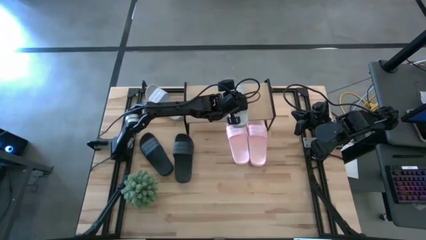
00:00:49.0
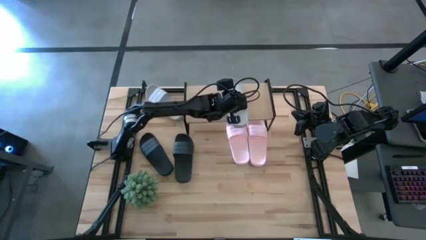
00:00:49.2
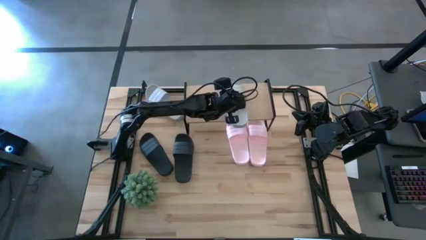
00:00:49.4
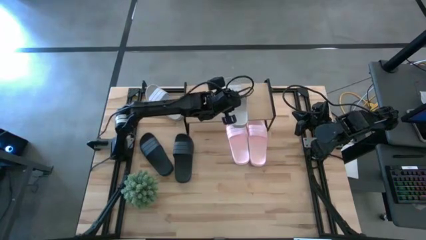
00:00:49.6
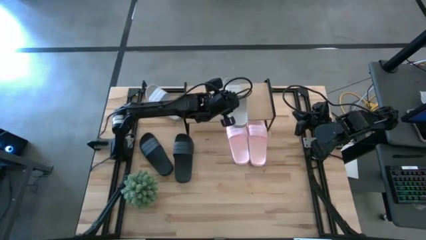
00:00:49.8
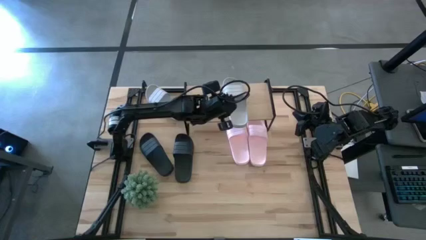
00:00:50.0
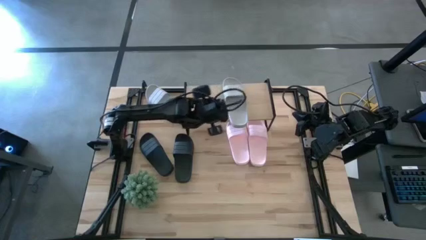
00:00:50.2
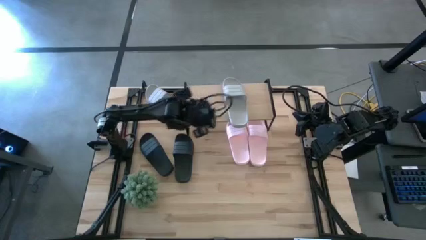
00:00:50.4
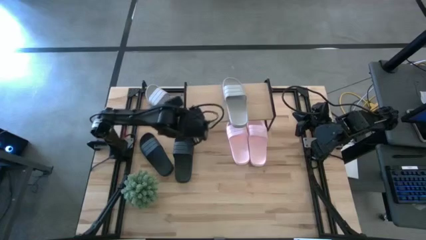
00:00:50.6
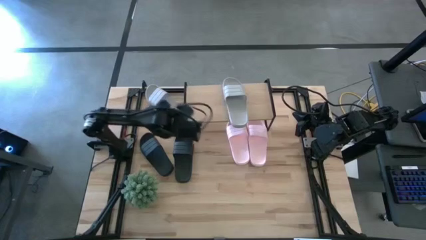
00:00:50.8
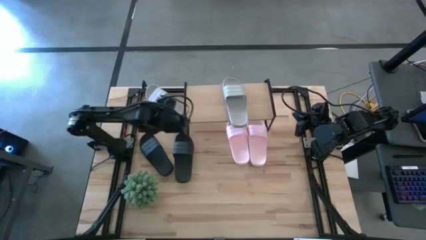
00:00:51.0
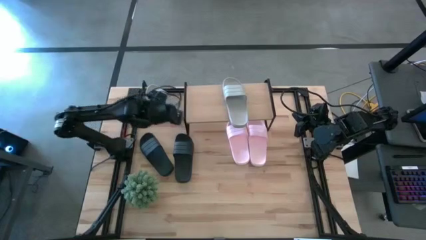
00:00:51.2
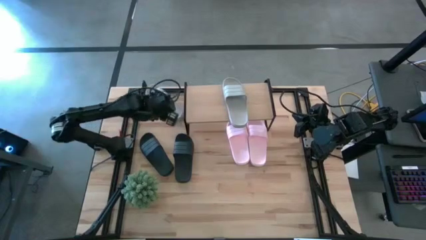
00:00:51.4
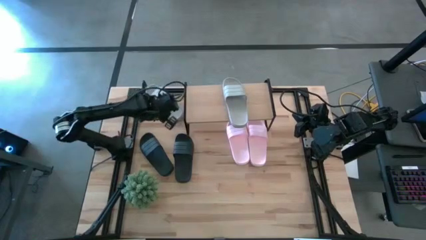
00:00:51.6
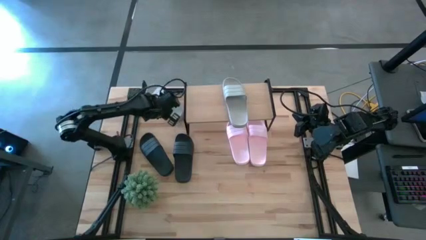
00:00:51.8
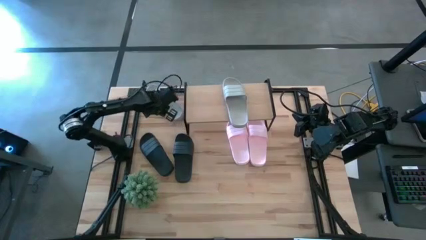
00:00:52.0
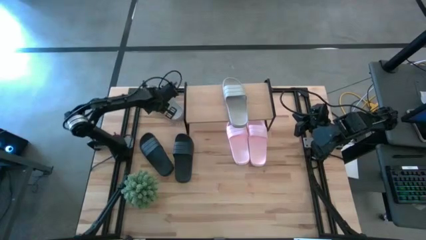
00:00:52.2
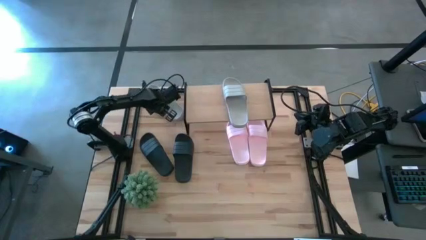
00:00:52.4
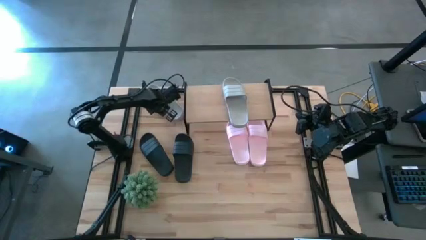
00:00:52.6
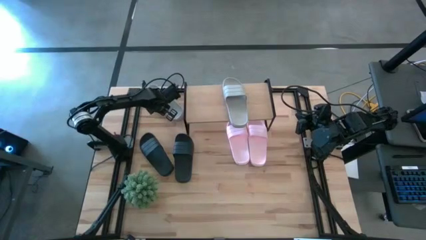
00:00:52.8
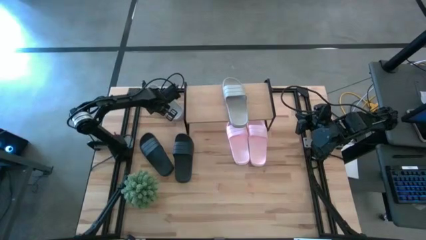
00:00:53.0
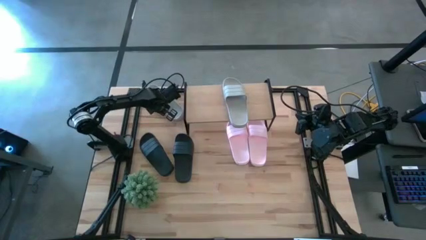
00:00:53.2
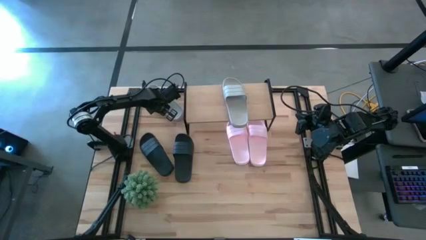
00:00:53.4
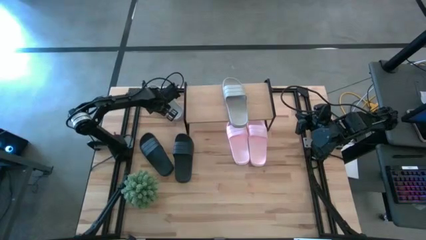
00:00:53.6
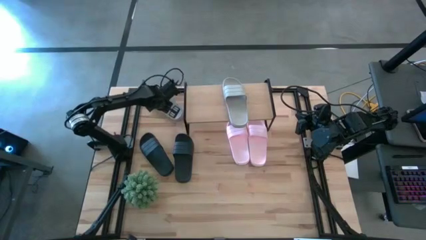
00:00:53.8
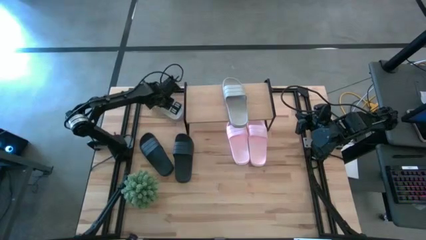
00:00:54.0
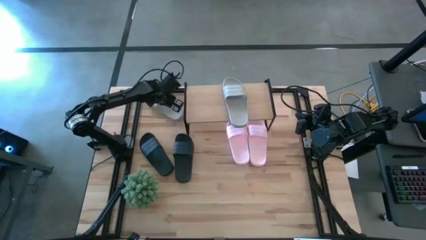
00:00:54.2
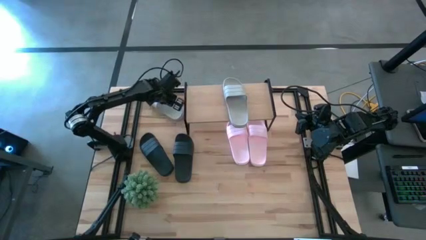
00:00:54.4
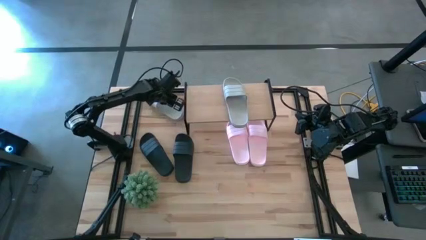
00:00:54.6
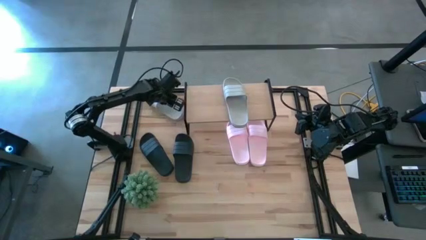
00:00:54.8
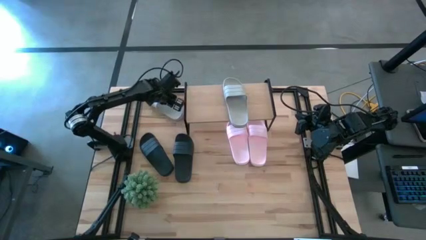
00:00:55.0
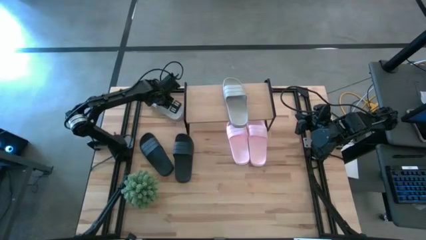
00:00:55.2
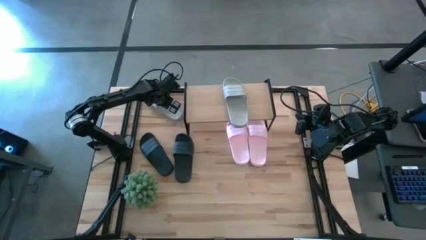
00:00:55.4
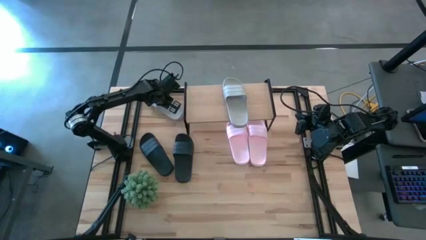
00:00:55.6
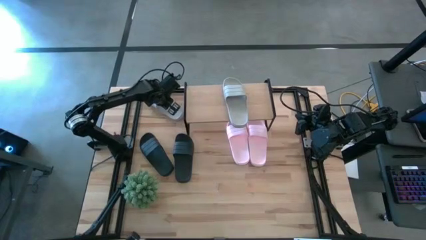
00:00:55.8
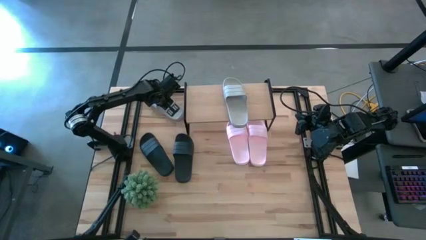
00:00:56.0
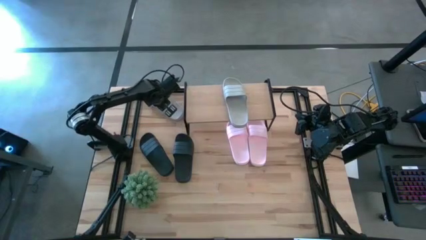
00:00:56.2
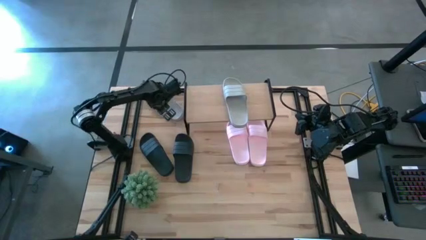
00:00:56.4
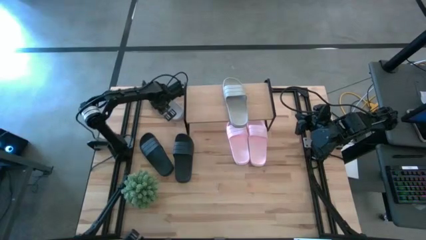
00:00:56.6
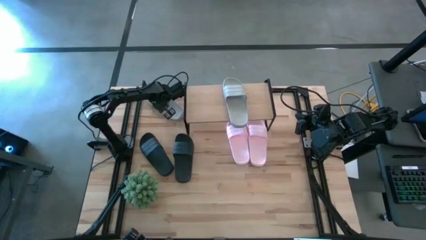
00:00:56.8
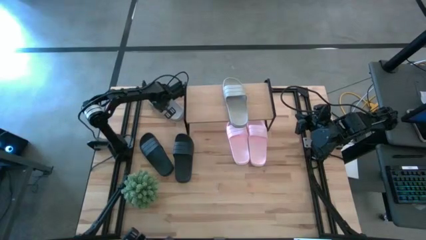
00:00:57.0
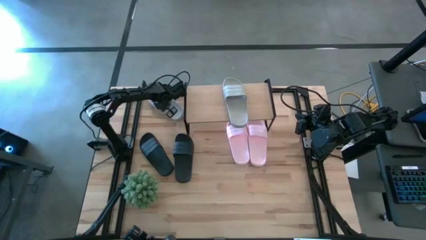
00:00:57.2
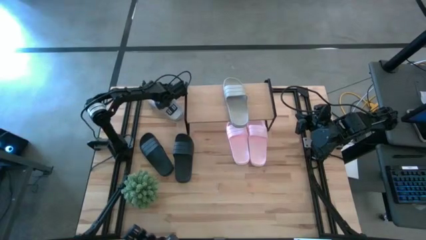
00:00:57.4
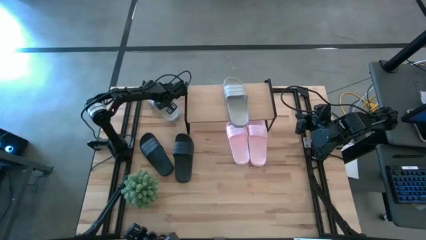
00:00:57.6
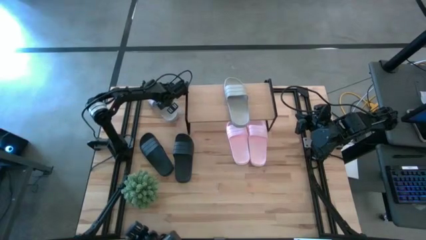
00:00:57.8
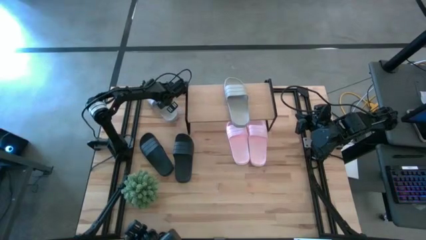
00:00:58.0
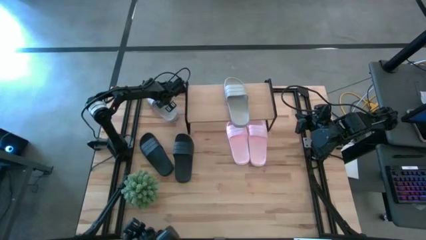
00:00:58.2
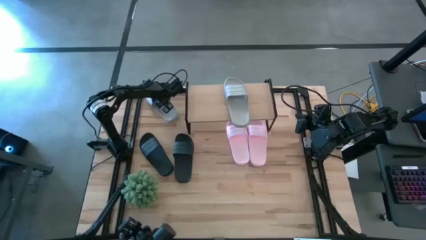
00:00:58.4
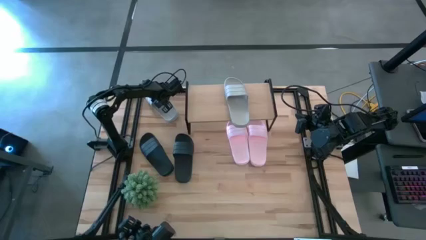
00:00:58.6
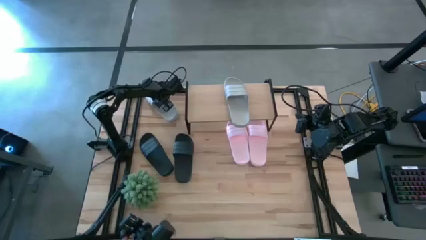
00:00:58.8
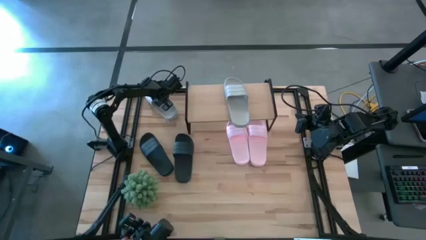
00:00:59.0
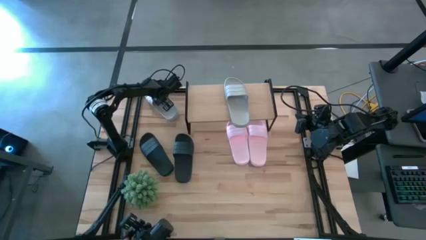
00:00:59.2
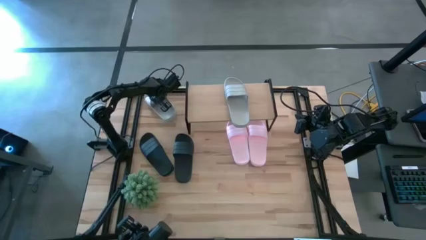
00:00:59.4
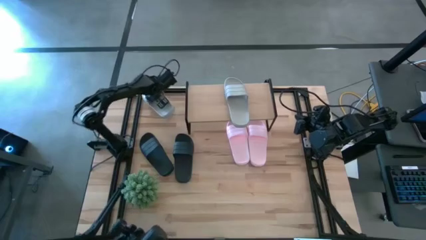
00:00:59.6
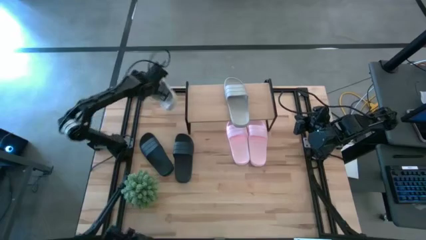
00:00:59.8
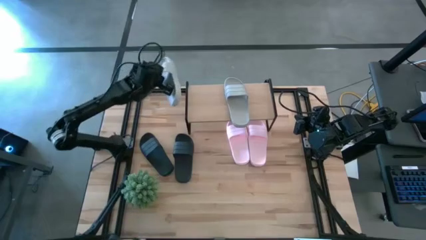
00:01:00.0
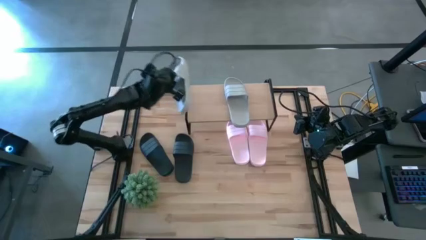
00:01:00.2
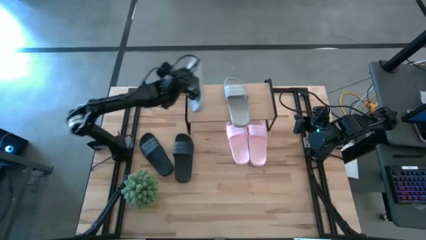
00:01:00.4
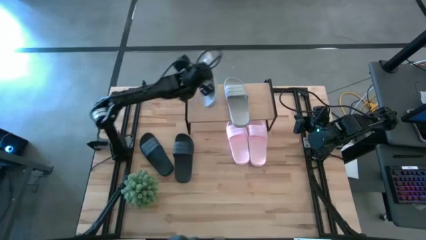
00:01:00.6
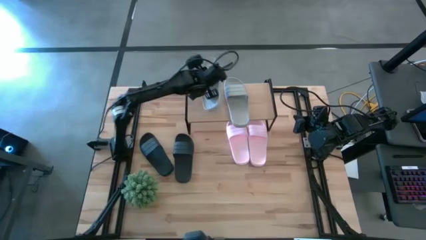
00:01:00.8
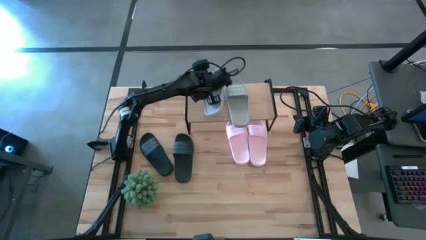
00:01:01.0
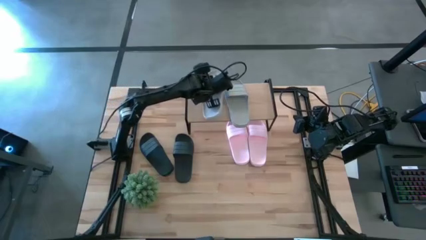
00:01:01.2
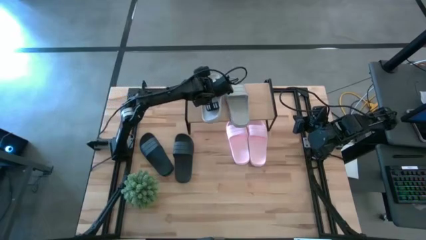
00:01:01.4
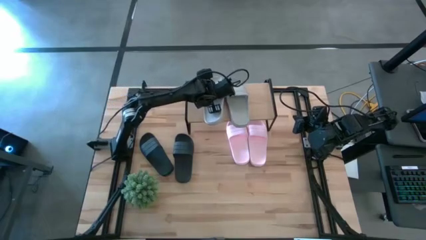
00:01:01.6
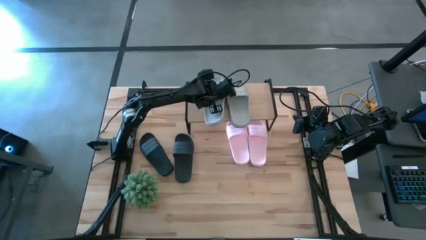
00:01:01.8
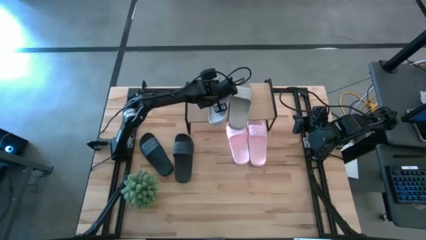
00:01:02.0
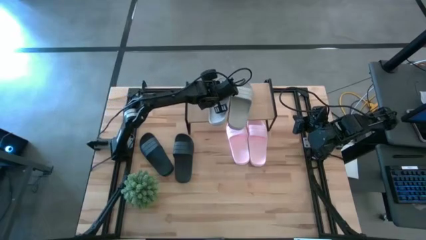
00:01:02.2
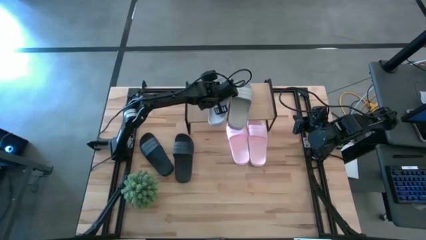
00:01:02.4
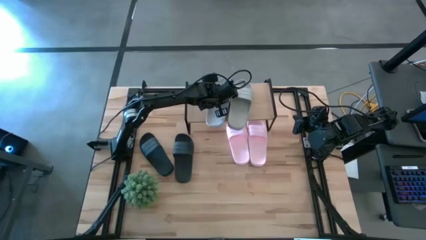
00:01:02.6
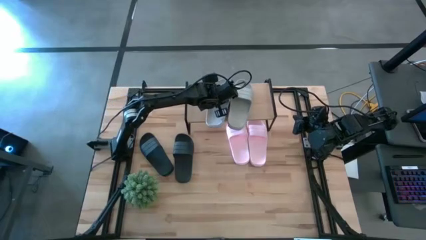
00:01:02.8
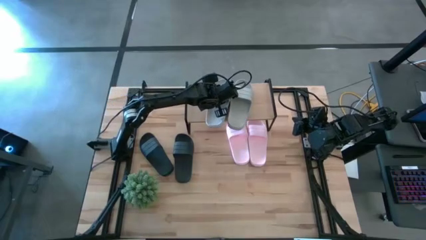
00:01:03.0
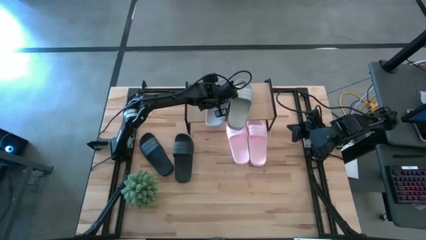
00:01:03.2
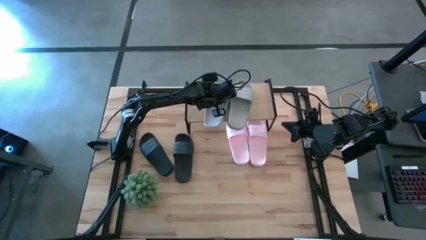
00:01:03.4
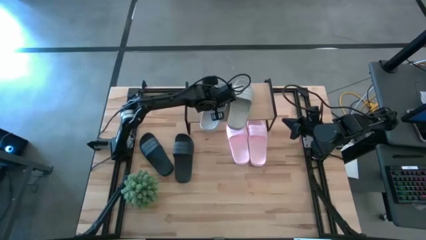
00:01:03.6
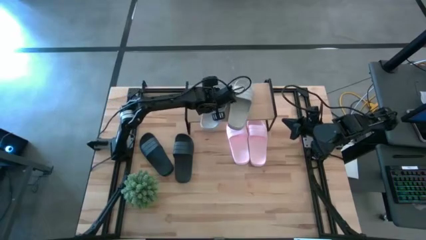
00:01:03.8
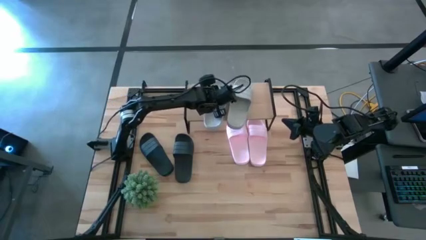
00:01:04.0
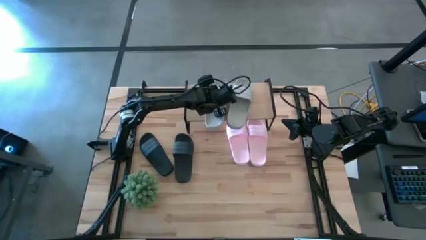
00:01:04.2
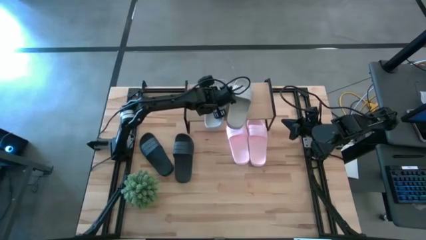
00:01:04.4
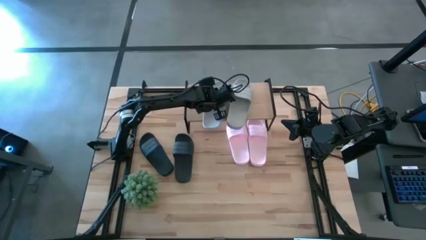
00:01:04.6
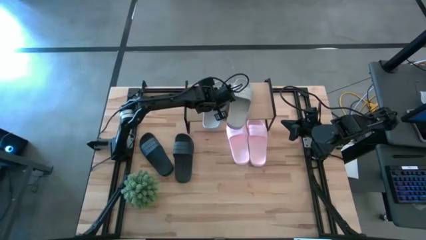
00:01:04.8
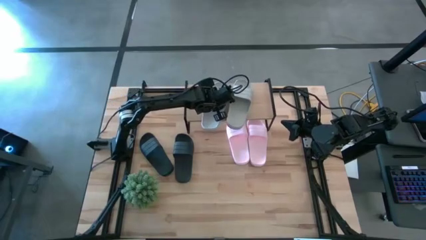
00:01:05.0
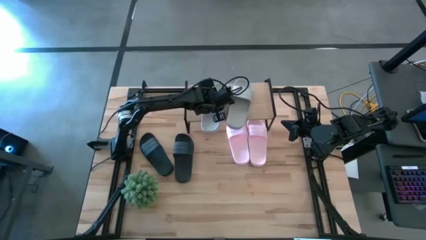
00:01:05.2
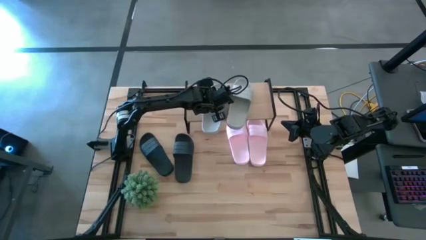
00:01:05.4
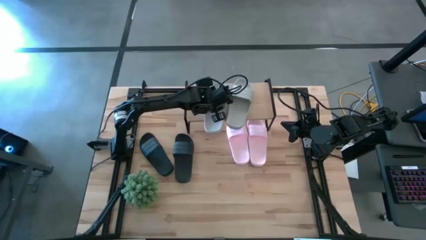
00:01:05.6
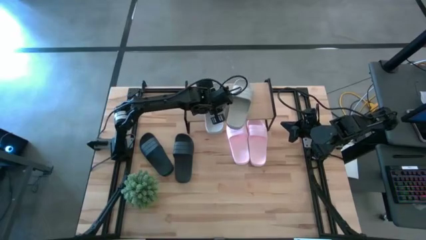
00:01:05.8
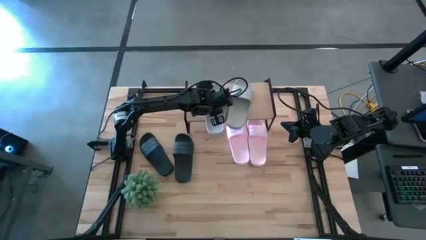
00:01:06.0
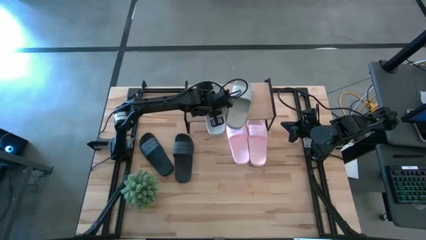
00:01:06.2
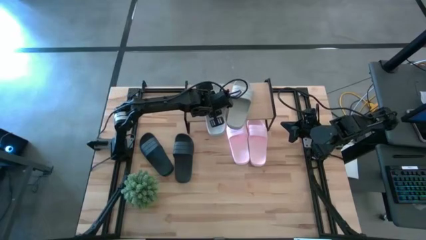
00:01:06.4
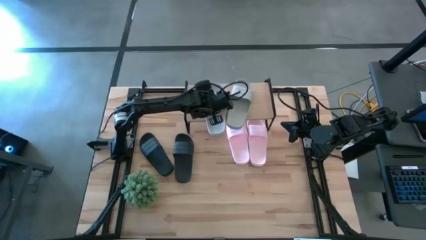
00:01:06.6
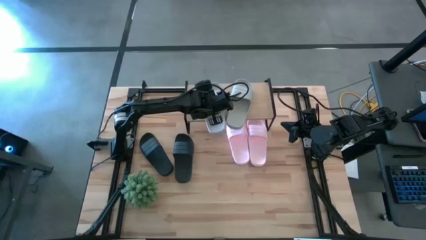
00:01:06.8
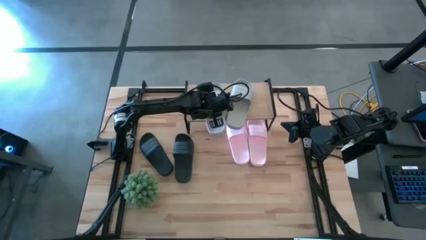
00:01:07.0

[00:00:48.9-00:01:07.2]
Task: Pick and place slides into the shelf
Put the gray slide on the shelf
